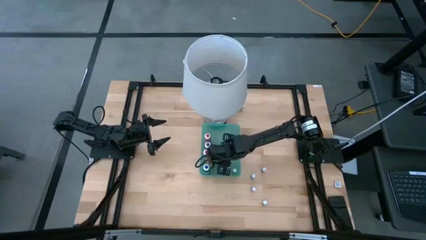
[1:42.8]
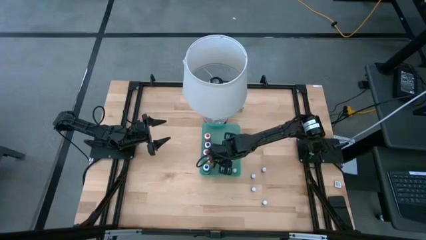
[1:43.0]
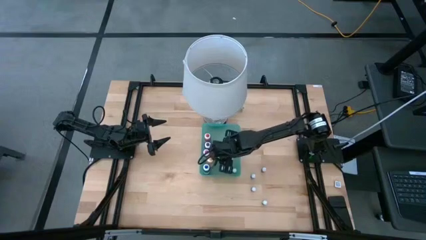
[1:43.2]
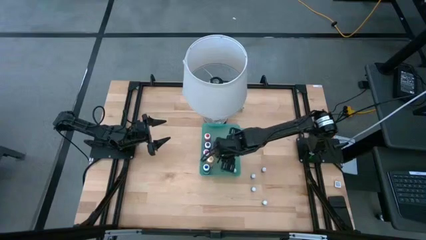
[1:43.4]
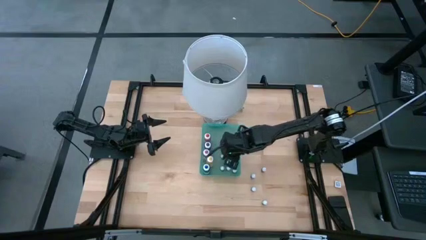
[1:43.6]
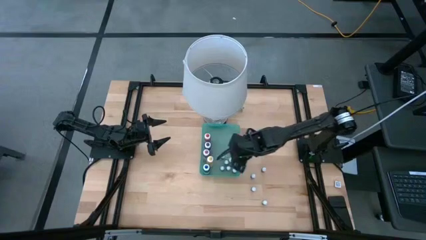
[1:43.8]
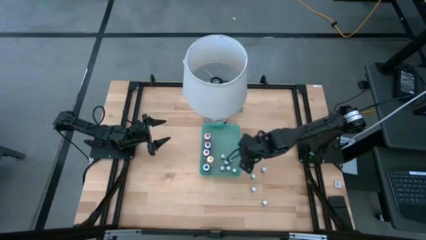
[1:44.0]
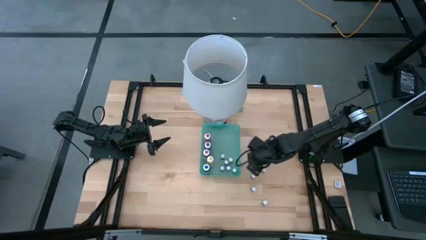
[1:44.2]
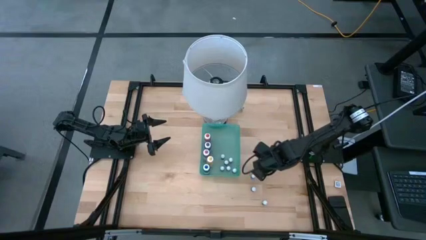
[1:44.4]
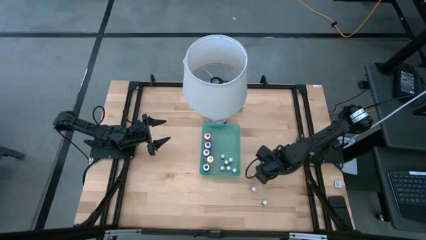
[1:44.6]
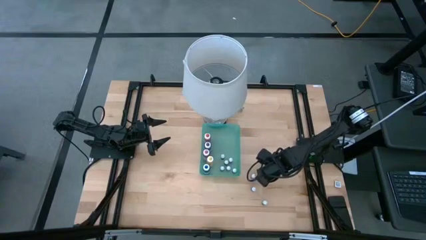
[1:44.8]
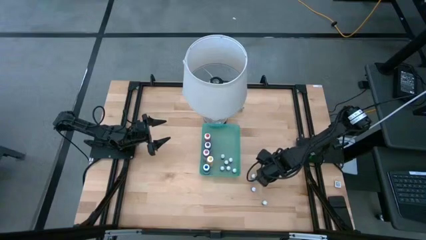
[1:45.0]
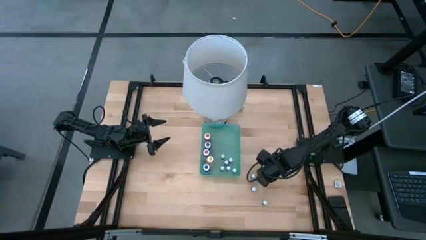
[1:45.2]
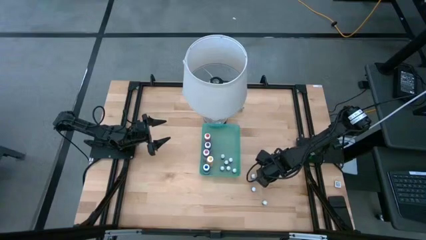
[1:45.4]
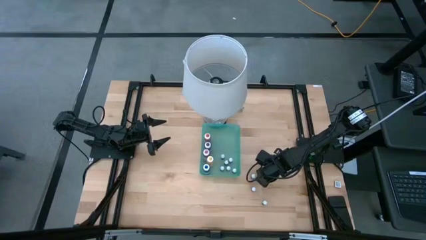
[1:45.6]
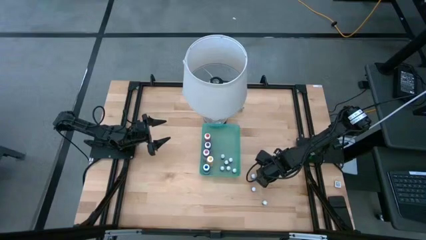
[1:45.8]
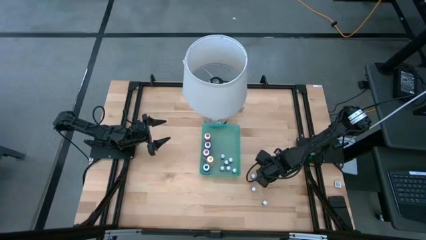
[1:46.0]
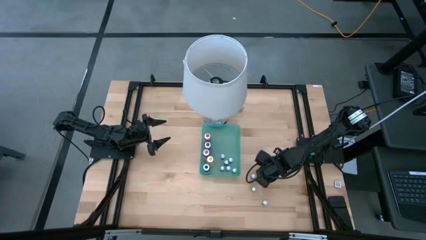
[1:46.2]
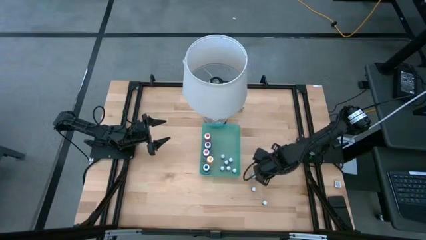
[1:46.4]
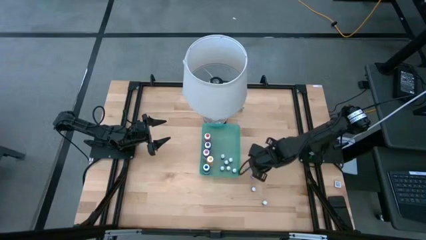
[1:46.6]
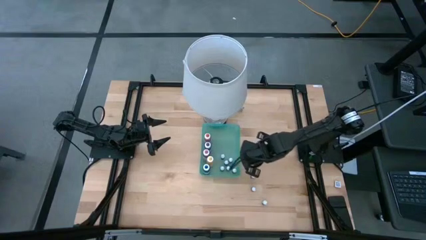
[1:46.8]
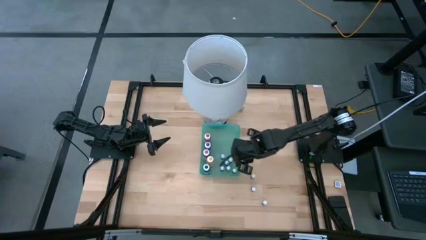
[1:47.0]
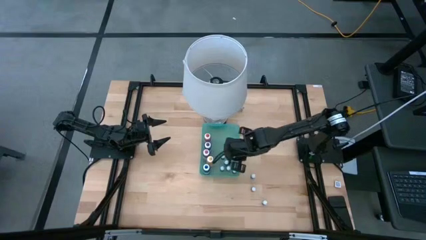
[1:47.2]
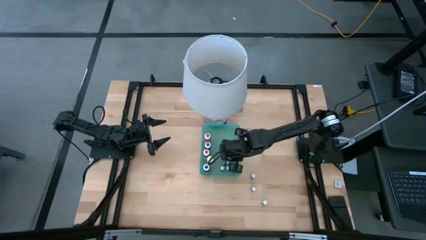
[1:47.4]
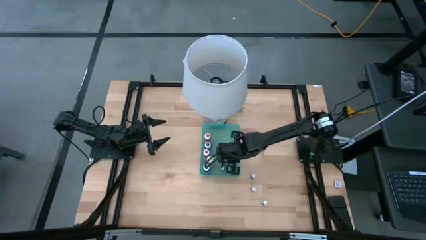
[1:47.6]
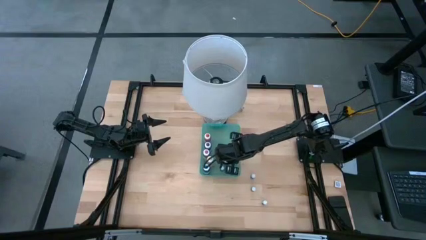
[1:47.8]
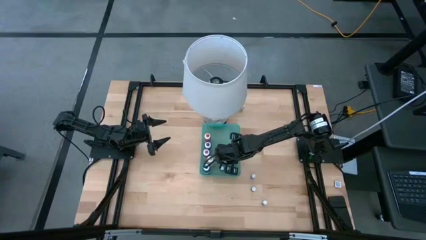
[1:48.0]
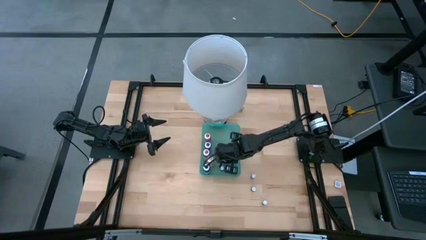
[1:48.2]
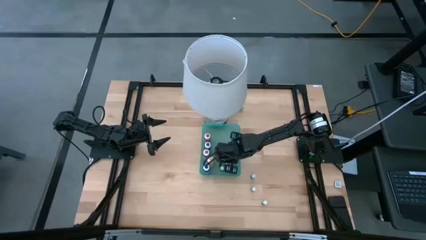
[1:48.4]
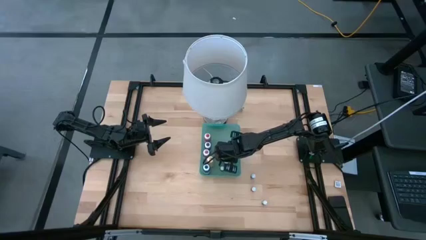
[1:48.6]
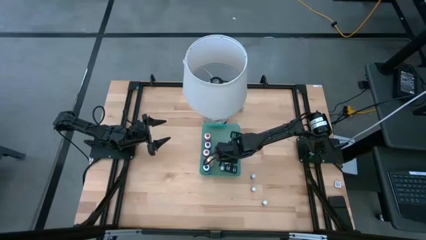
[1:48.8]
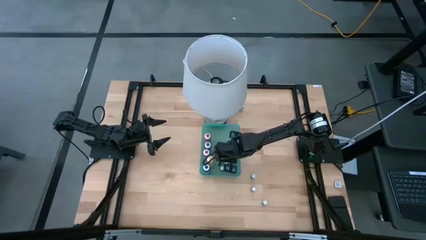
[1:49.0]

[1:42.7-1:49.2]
Task: Pick & Place food coloring
Put the small black food coloring bottle into the green bin

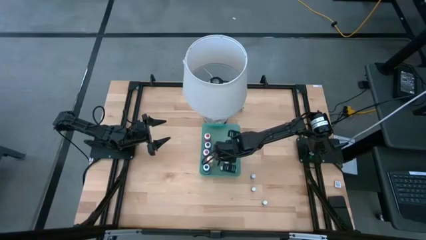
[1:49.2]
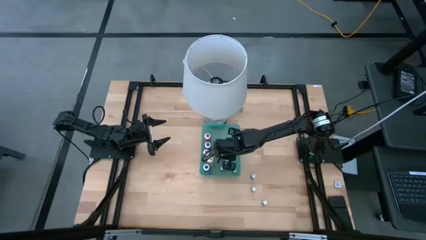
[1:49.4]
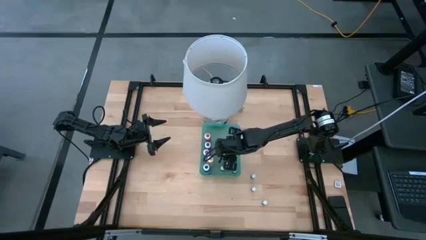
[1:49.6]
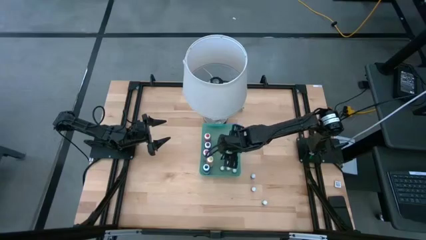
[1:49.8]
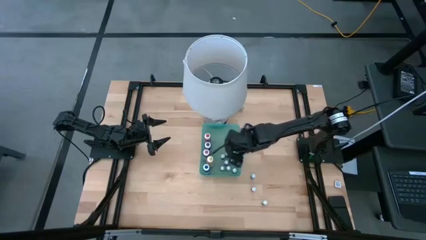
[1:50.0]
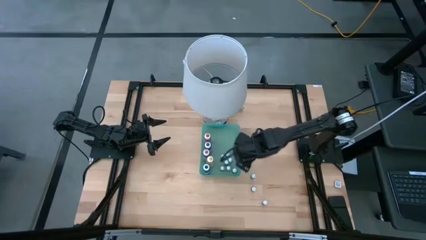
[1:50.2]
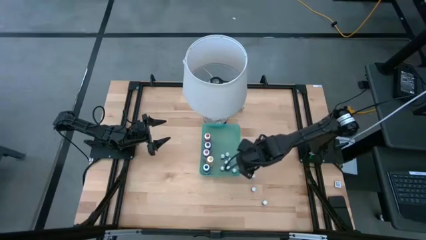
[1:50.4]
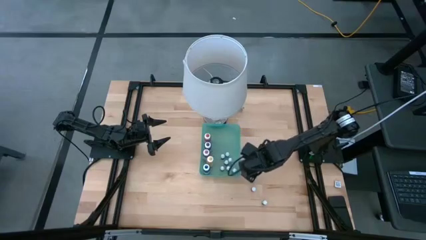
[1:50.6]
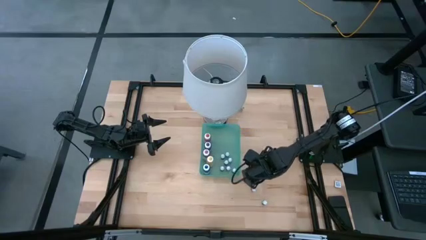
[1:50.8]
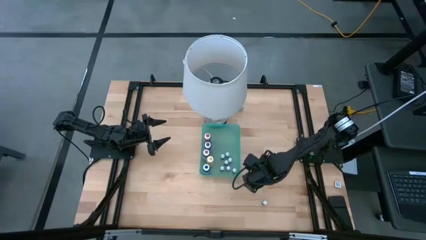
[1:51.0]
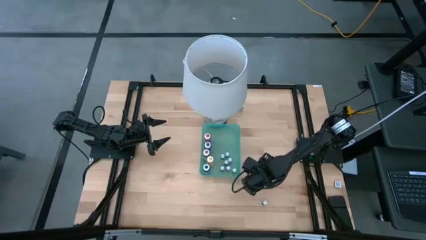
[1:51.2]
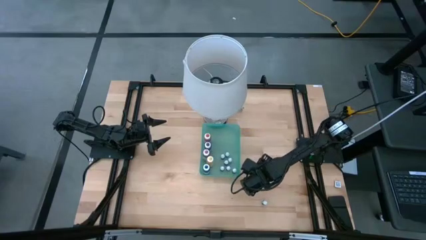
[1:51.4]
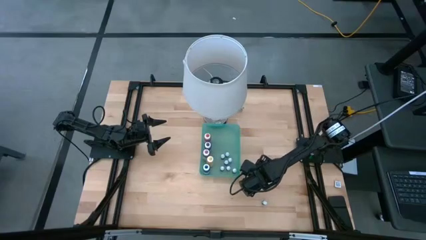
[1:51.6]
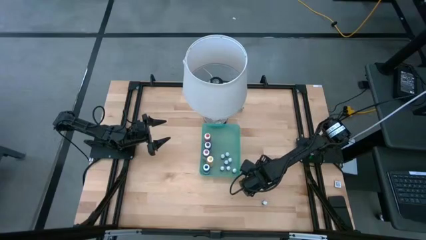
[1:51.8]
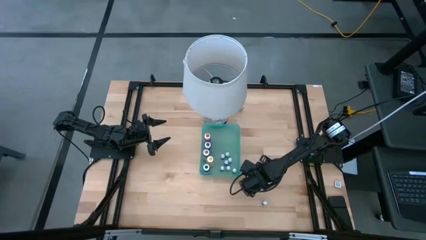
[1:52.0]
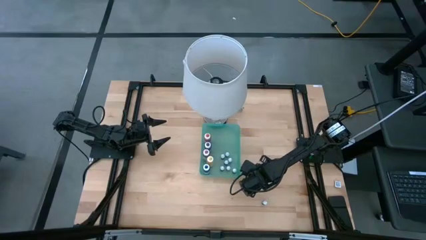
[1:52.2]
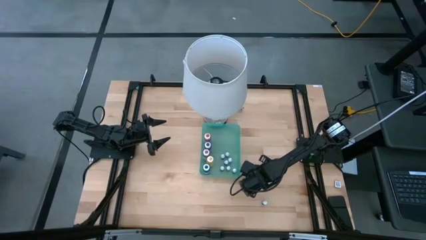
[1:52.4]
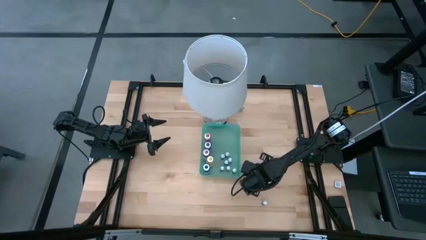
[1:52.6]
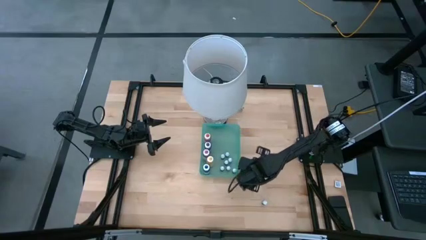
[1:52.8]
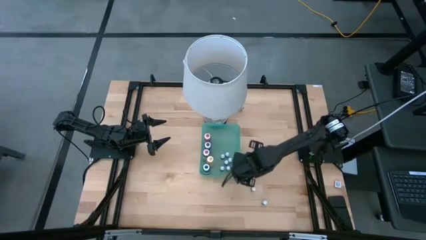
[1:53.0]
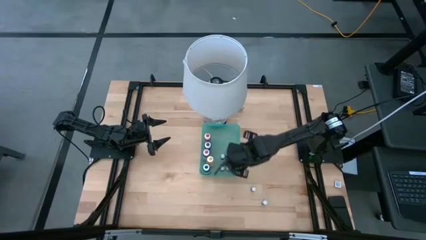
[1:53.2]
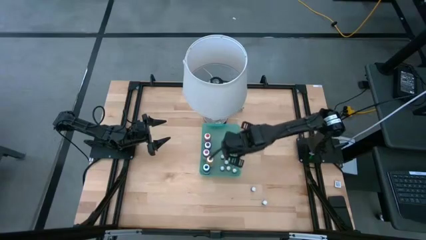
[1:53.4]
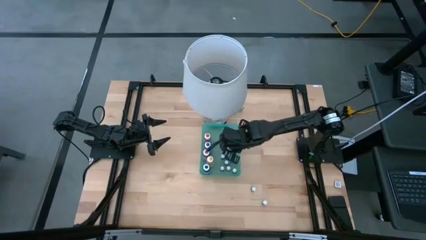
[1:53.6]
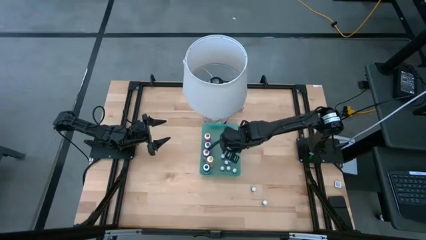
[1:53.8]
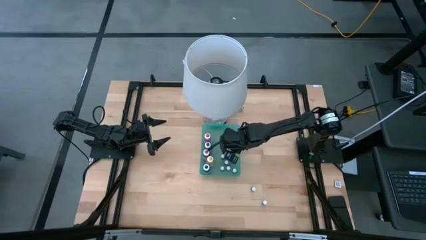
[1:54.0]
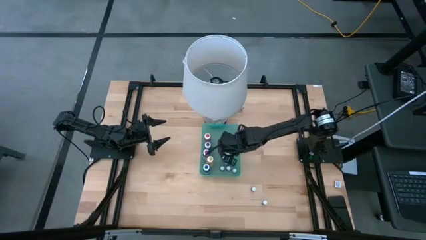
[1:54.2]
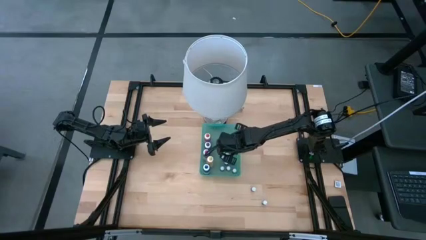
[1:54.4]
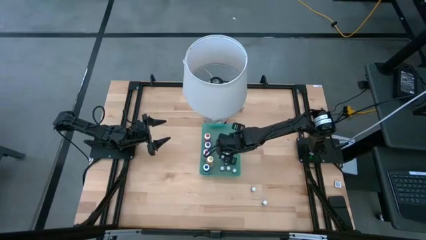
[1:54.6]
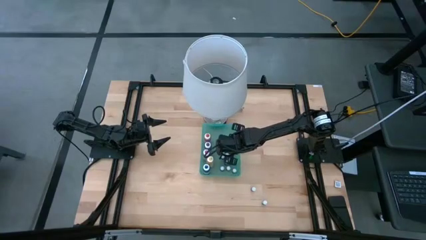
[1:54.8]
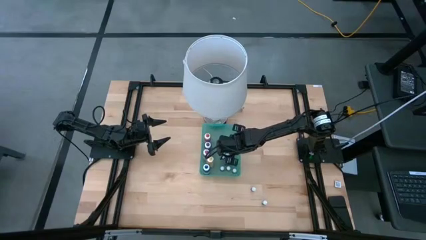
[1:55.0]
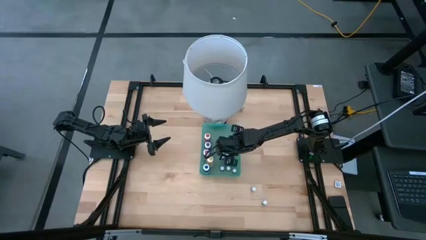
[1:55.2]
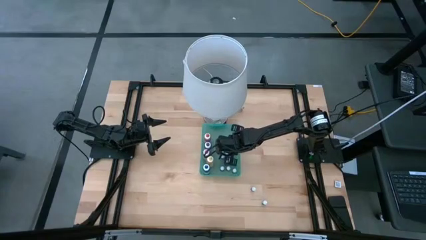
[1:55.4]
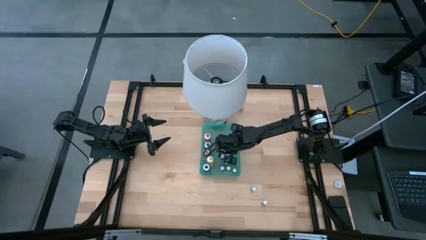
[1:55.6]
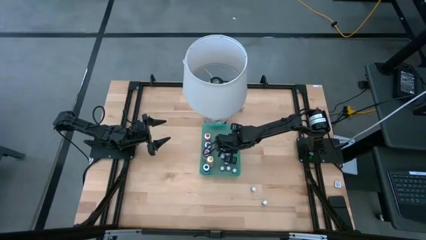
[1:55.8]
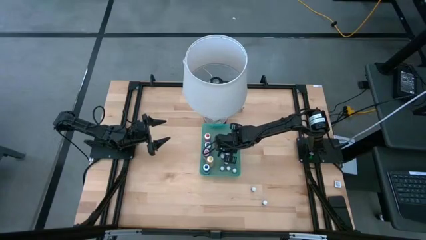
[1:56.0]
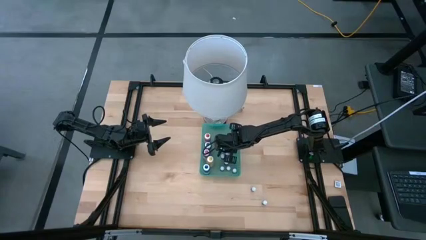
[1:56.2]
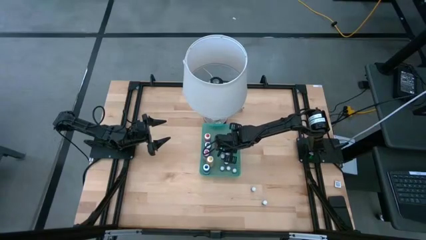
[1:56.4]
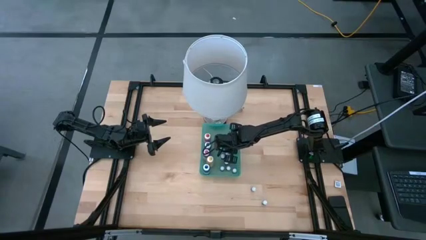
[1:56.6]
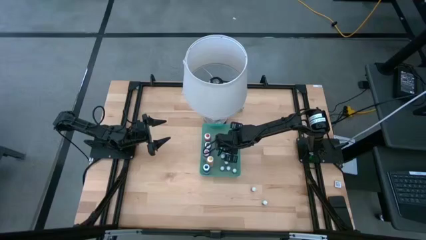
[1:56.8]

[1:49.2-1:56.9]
Put the small black food coloring bottle into the green bin

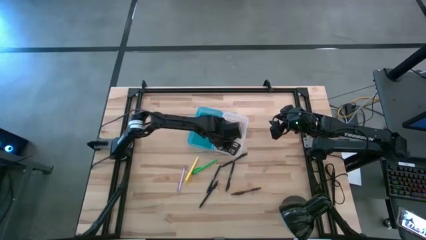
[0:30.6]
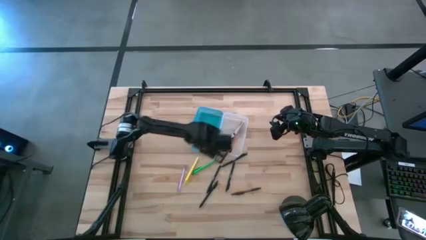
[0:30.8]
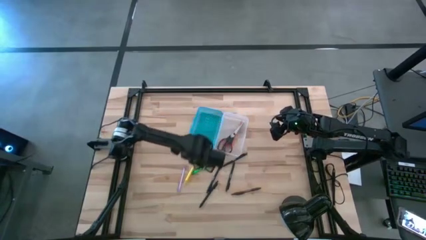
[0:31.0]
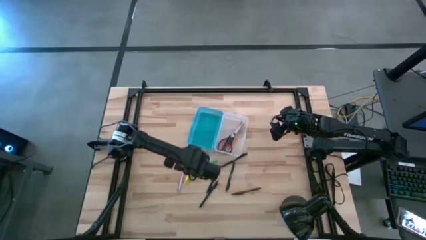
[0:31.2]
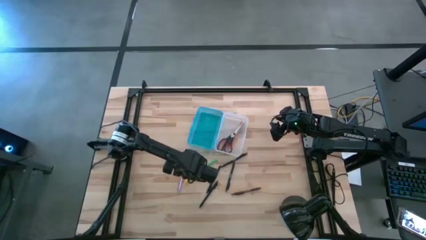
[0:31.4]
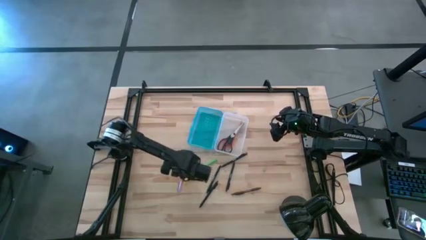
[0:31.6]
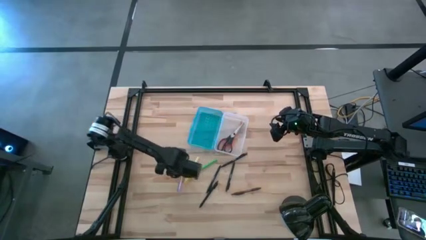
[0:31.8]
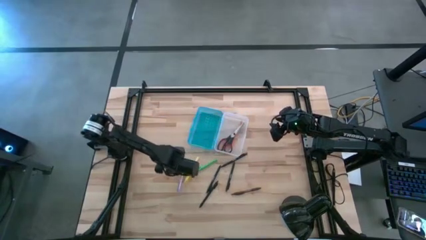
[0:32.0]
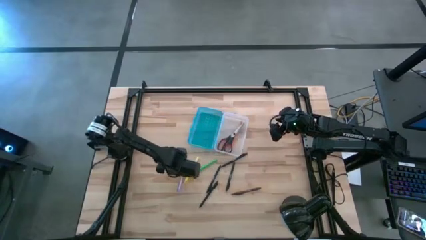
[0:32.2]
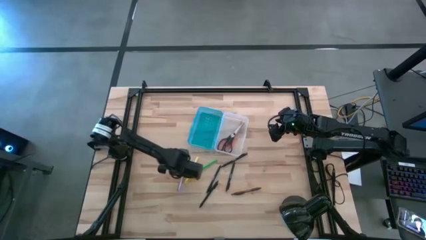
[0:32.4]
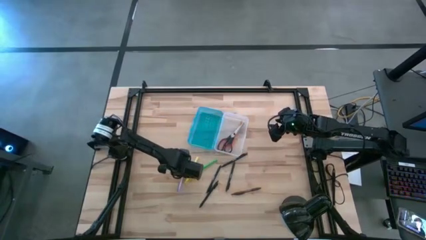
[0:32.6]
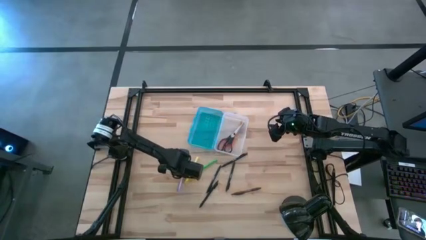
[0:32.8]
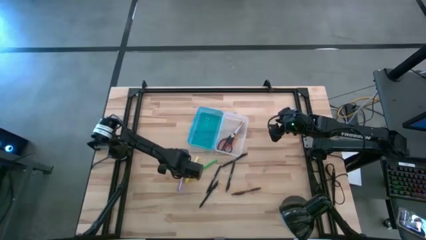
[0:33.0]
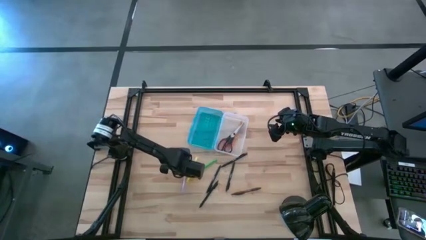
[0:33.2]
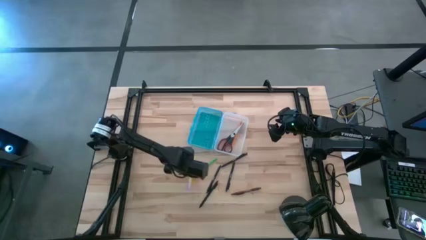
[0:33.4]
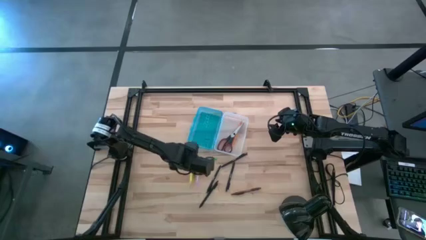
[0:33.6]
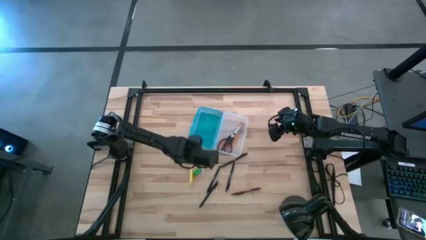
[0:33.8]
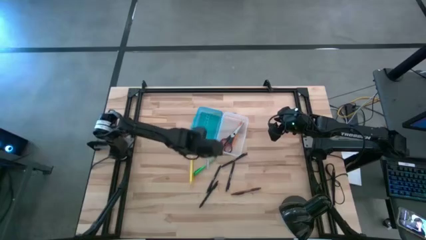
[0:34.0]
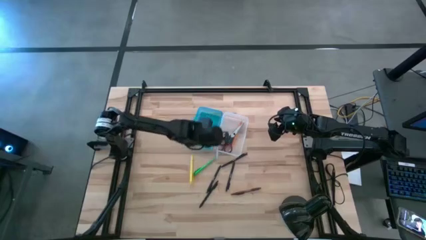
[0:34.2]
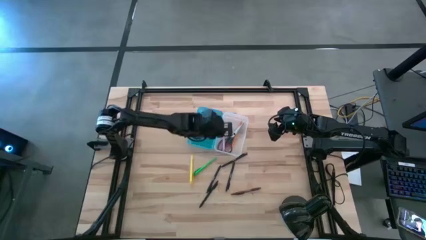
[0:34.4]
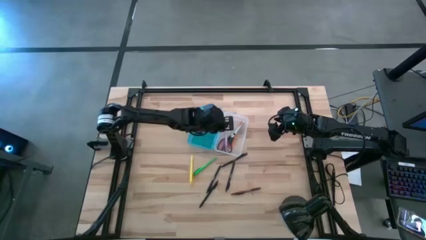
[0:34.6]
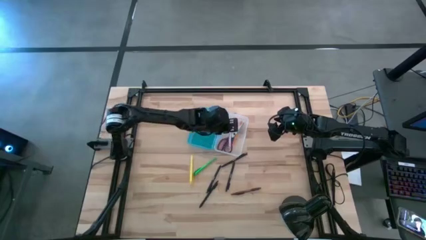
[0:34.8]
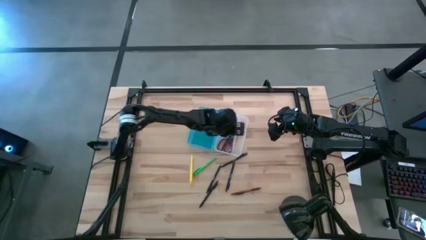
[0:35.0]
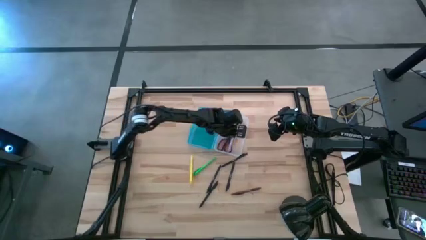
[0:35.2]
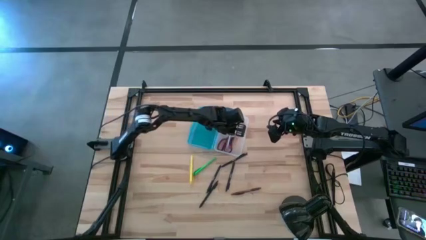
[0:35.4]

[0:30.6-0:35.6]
Task: Pick & place school supplies into a supply box
Put the purple pen into the supply box
